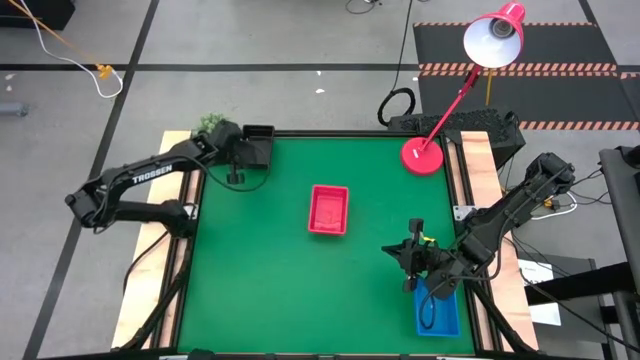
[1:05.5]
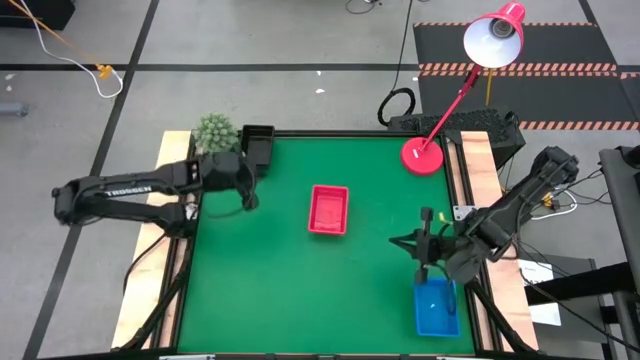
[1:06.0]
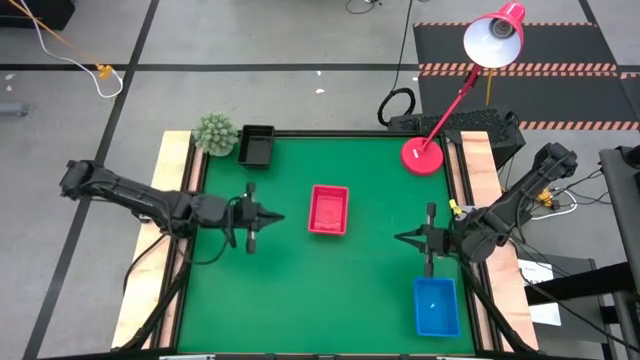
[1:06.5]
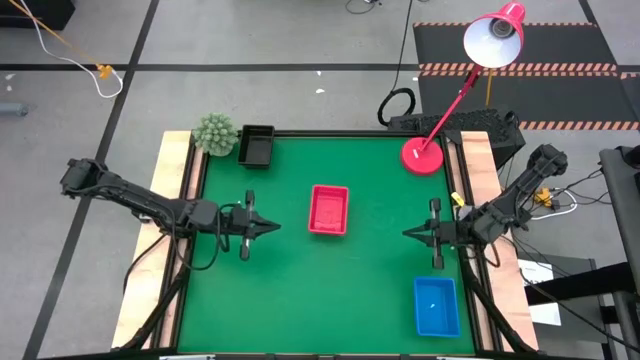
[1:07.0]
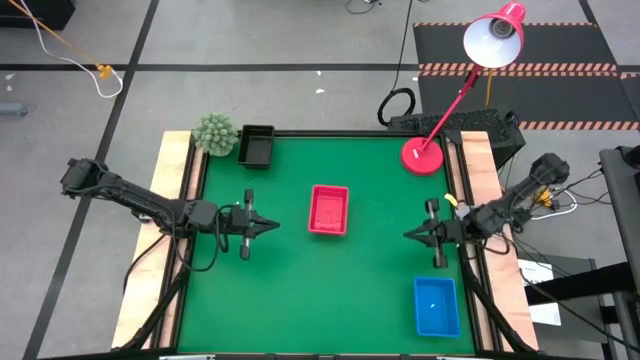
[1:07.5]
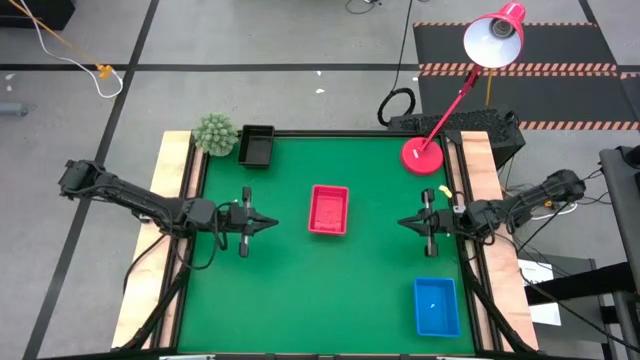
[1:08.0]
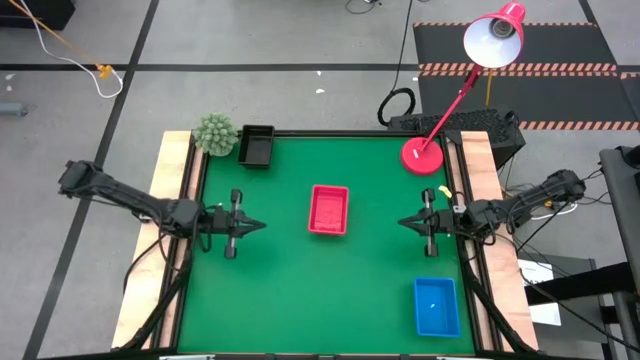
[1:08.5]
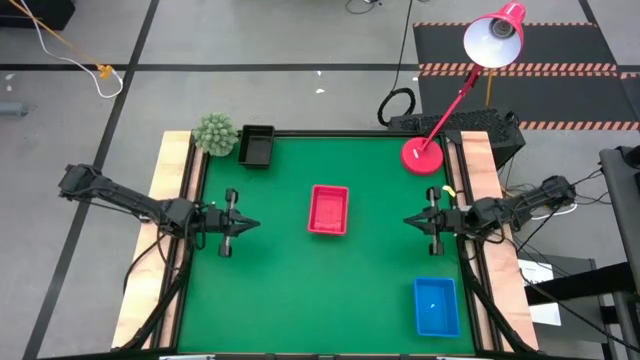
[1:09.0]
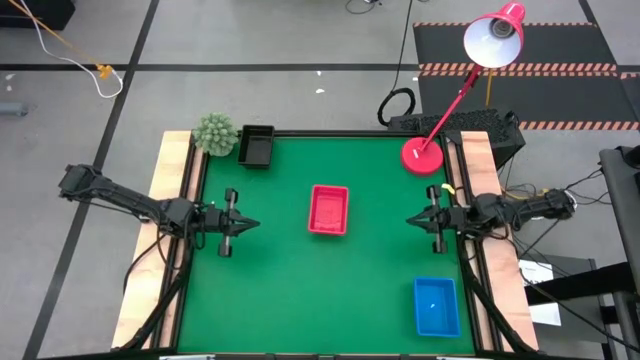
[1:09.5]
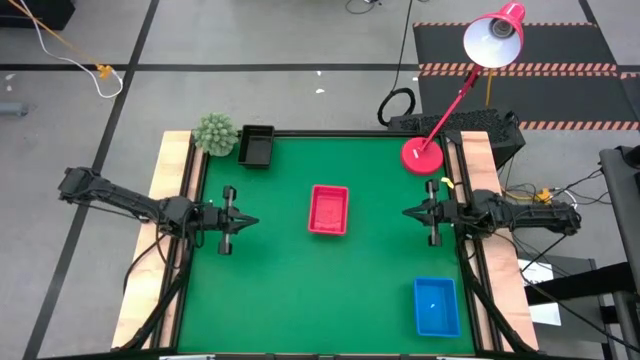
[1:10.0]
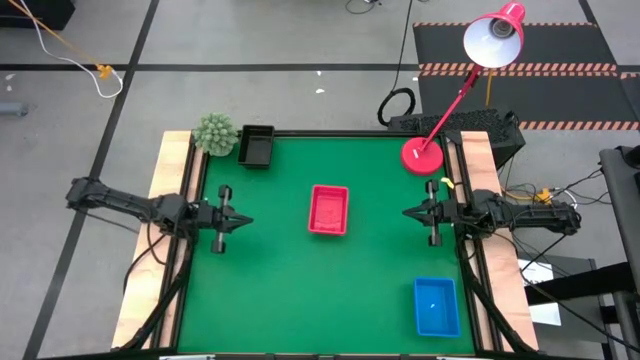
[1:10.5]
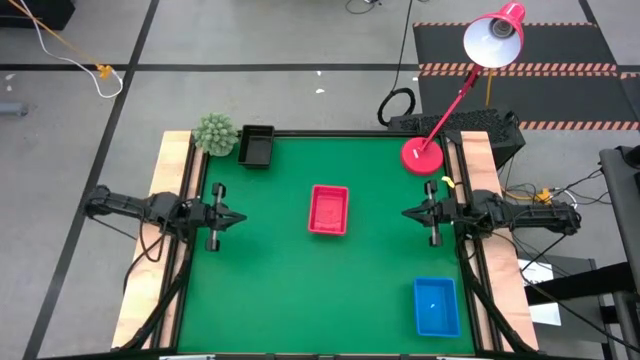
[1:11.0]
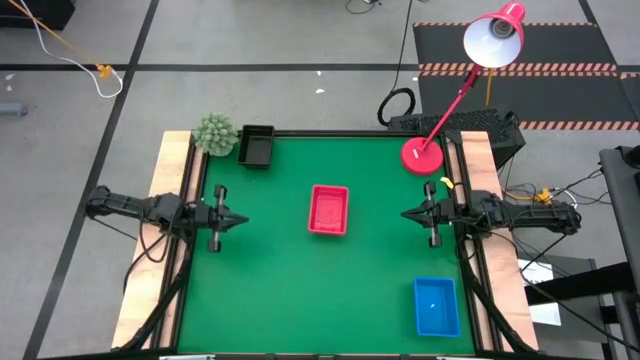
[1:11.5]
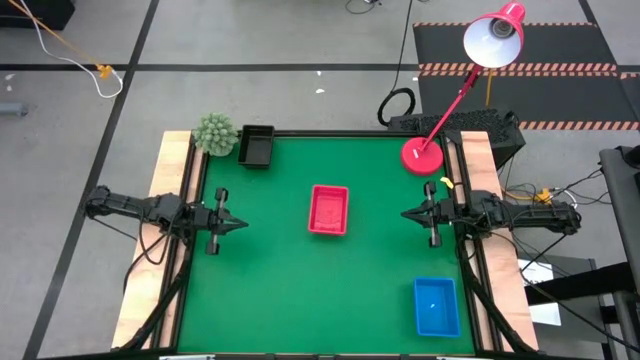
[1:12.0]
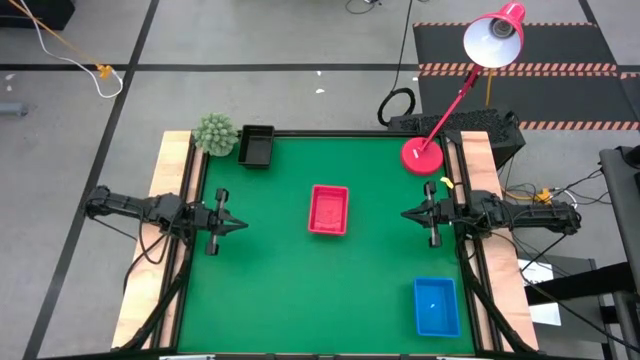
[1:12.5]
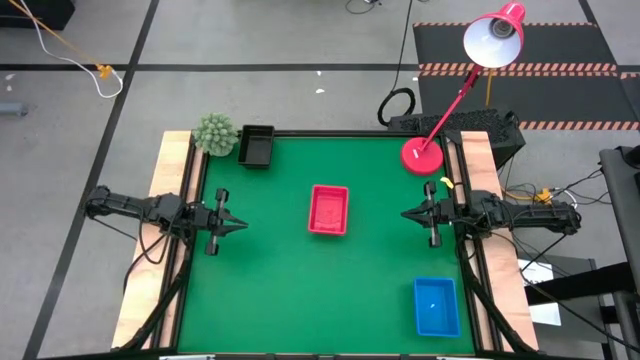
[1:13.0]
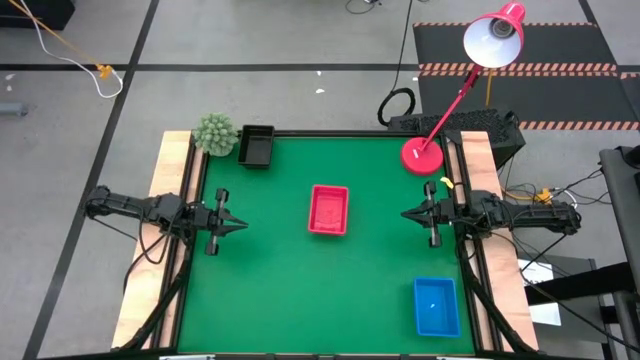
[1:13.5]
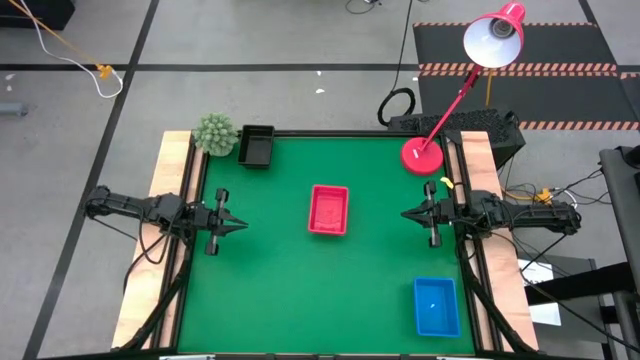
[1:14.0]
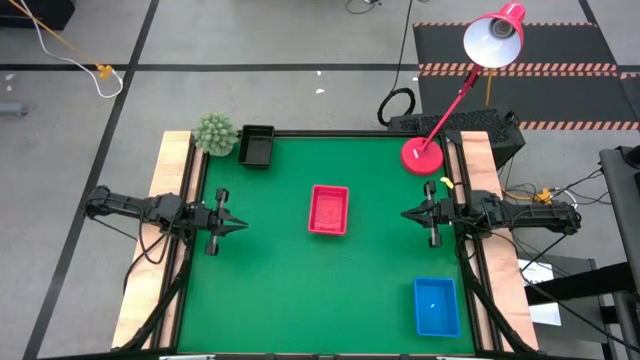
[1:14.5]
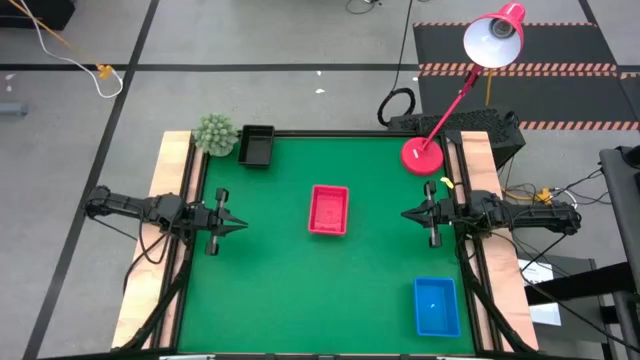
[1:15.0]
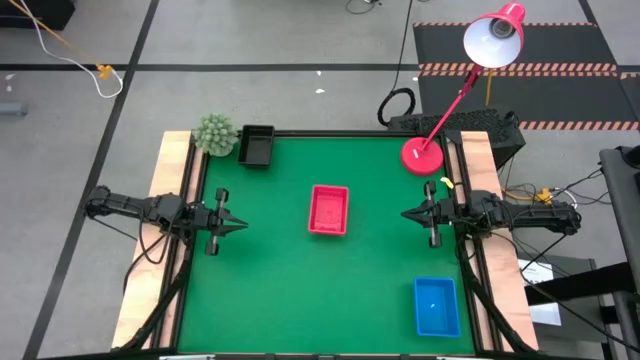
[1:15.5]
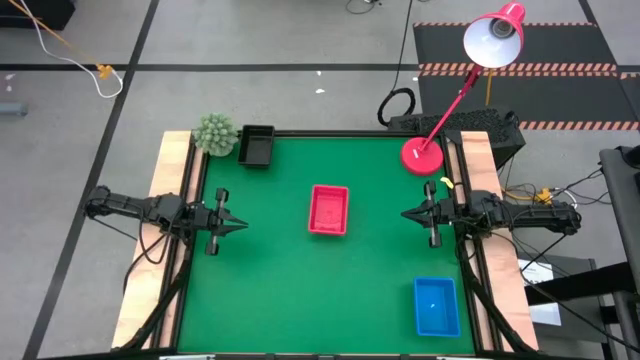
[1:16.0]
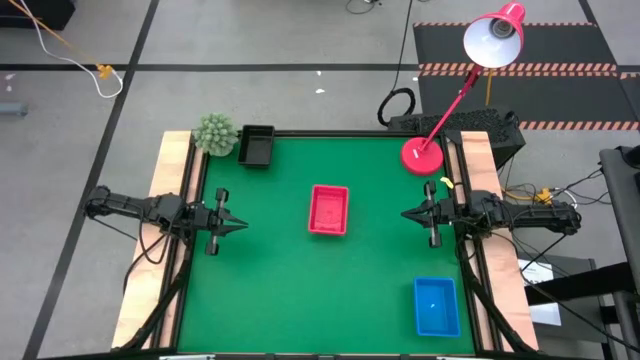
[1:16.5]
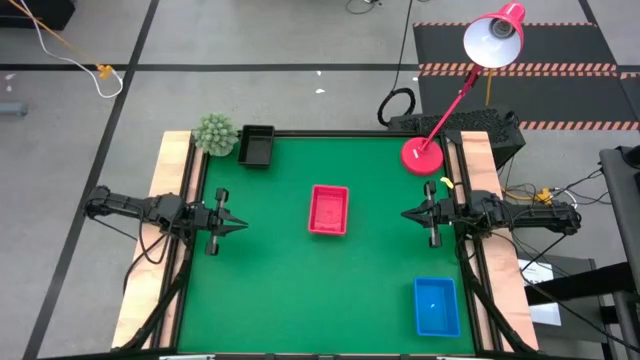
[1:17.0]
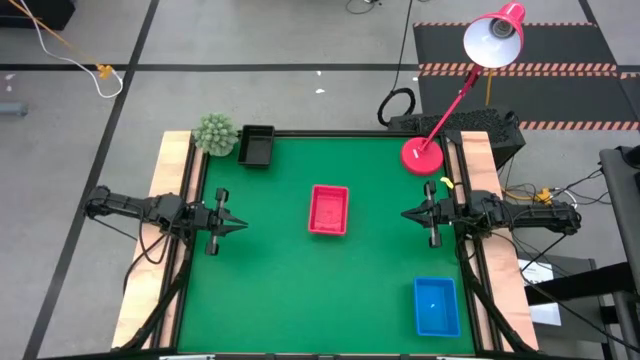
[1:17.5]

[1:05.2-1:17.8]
Return to Home Position

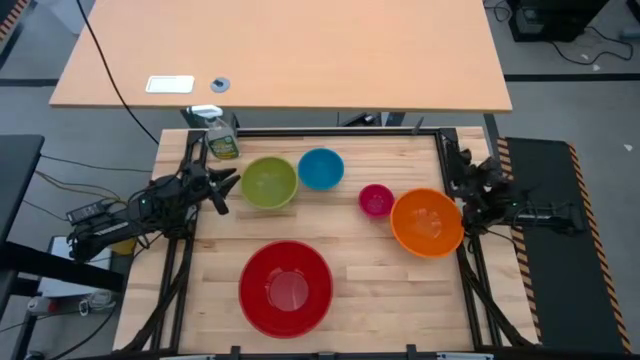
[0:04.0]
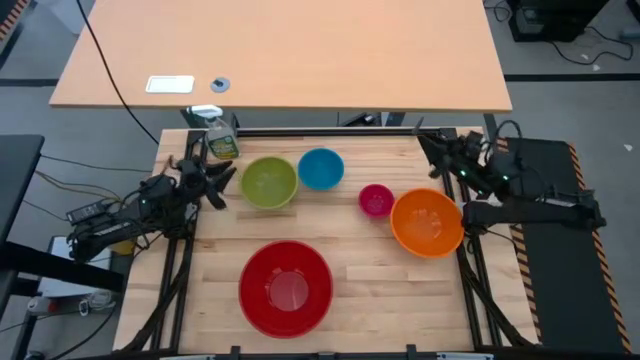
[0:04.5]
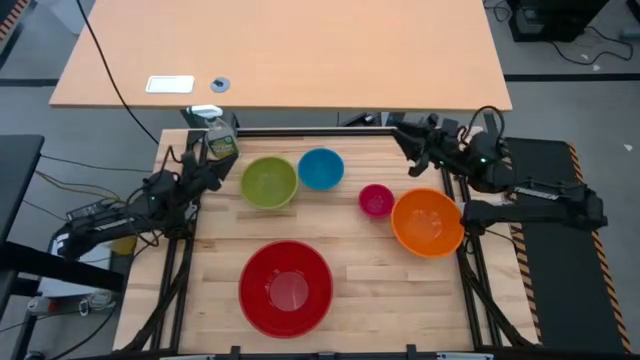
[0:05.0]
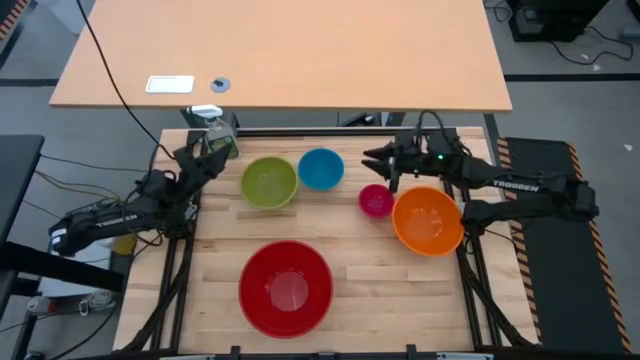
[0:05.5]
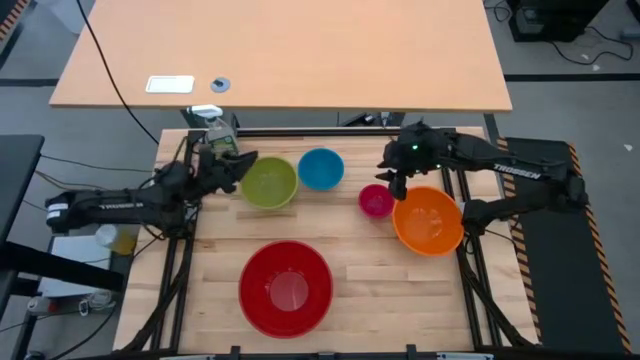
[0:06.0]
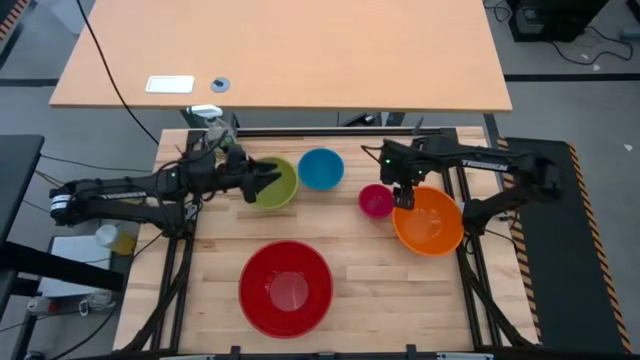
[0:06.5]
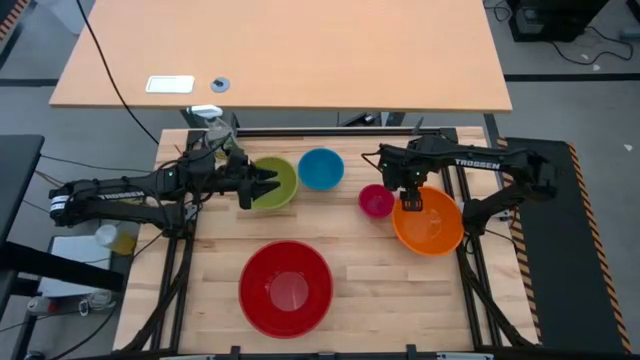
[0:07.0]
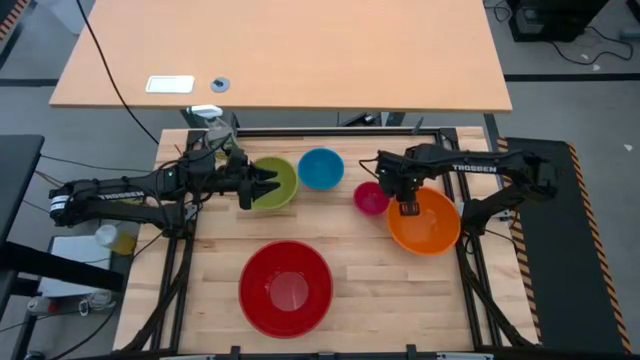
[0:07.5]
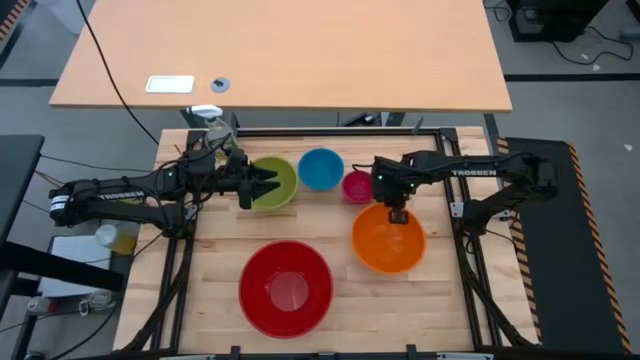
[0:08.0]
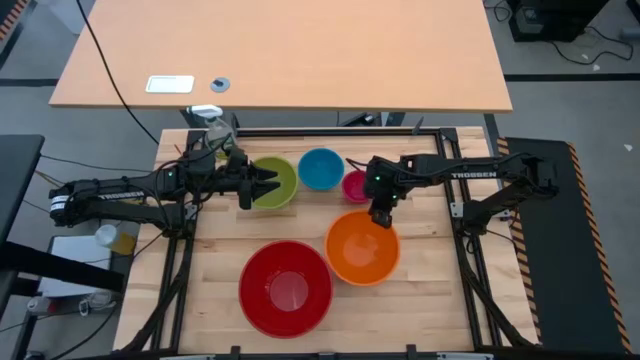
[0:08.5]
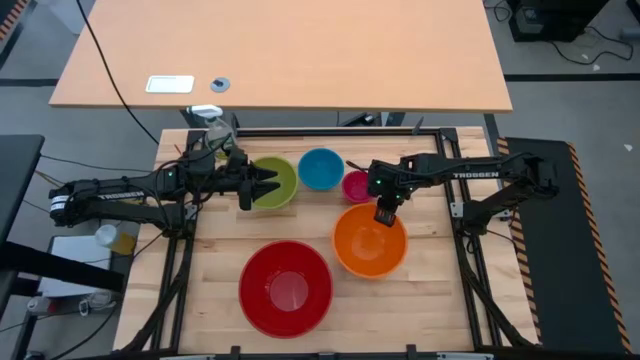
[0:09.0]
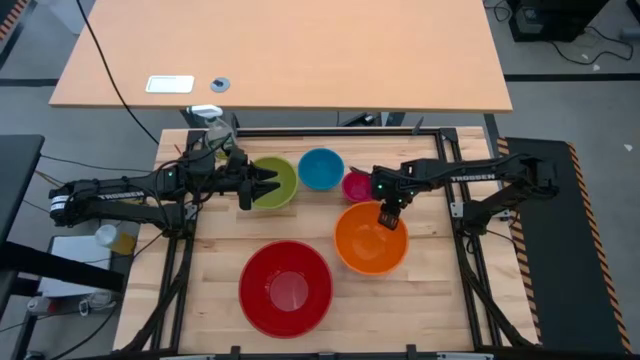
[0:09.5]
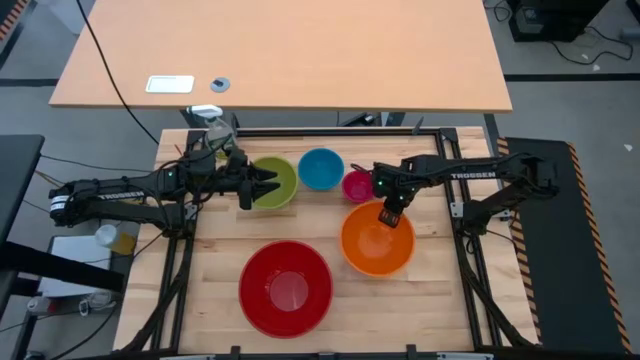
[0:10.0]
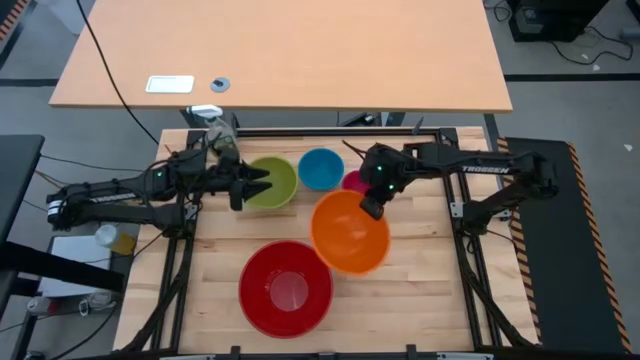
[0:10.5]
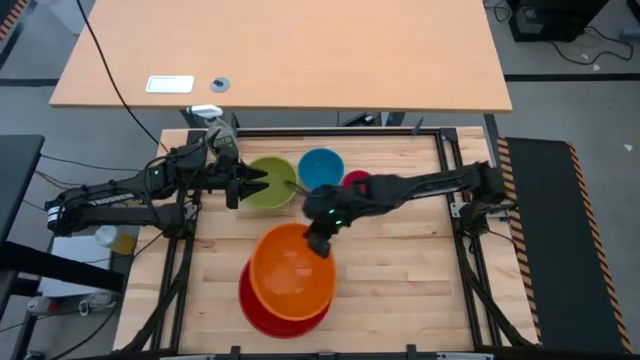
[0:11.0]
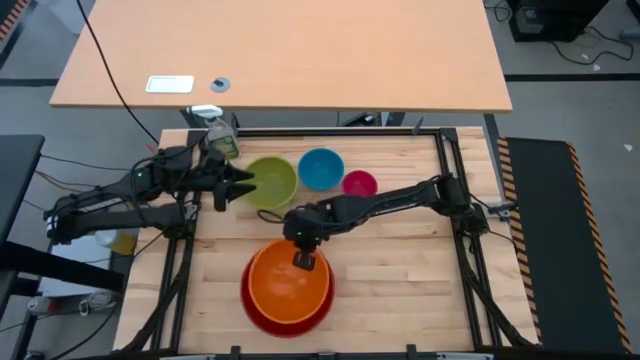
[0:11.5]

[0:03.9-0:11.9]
Stack the orange bowl into the red bowl
